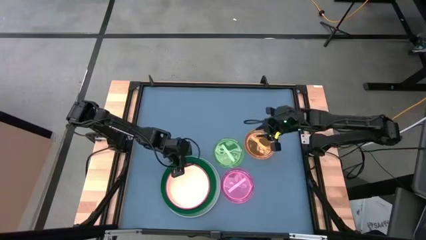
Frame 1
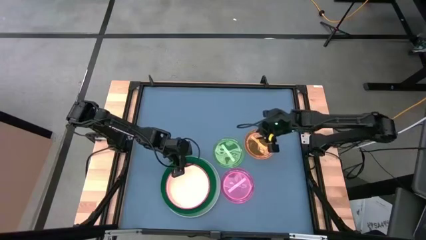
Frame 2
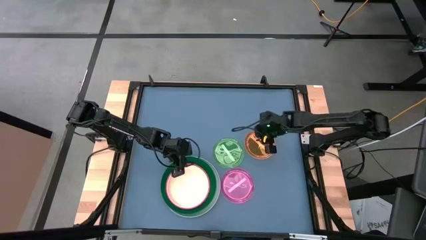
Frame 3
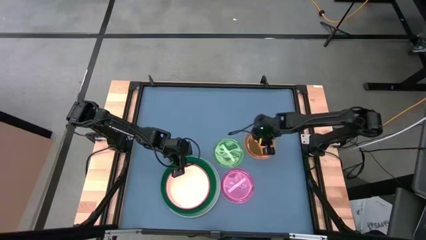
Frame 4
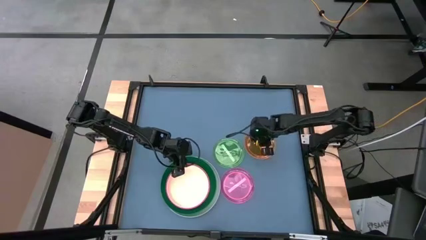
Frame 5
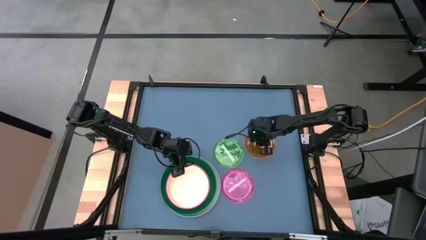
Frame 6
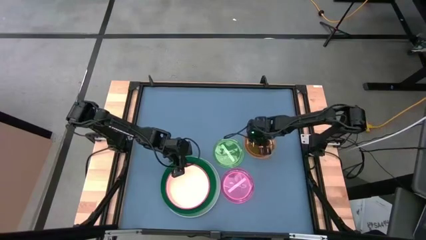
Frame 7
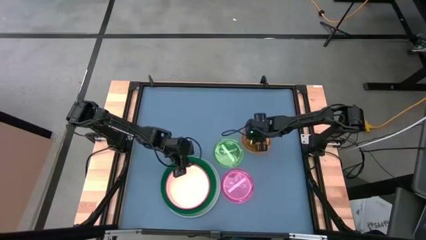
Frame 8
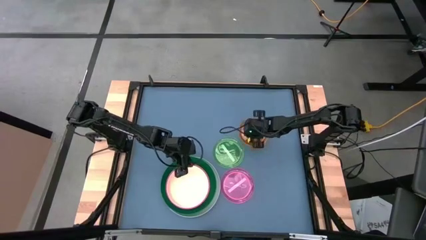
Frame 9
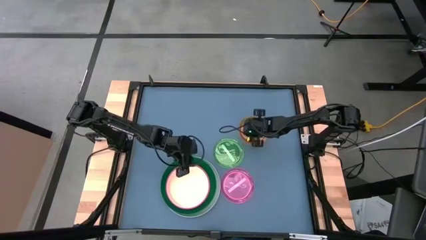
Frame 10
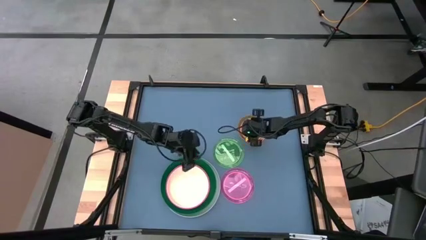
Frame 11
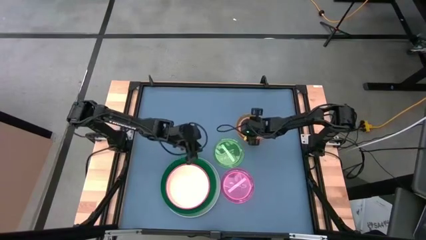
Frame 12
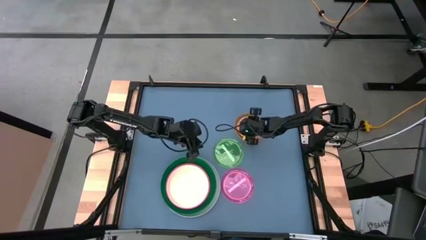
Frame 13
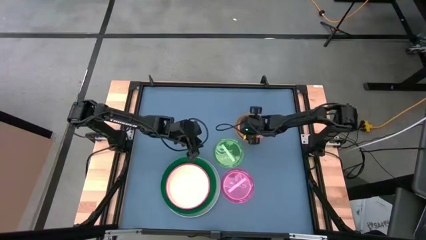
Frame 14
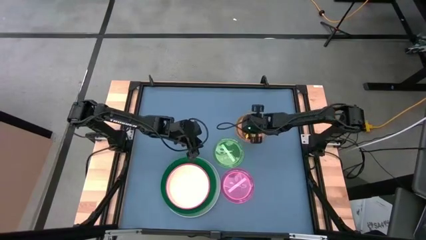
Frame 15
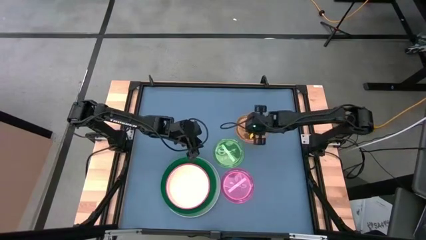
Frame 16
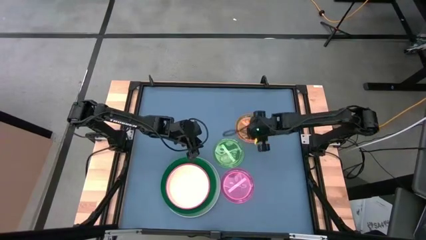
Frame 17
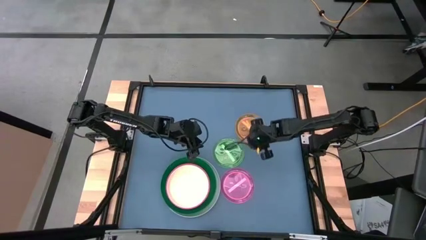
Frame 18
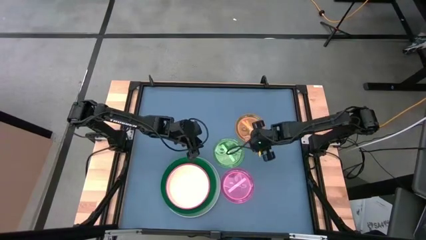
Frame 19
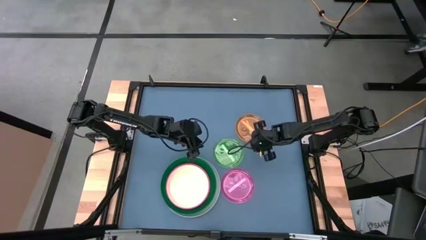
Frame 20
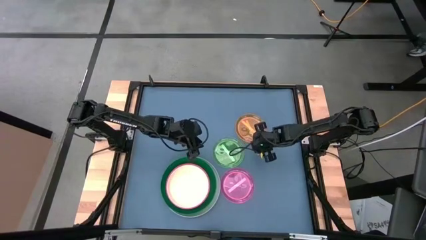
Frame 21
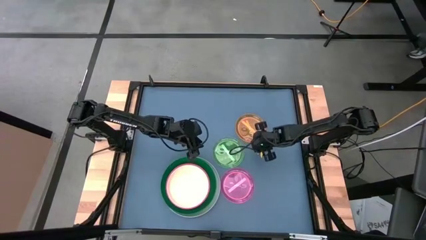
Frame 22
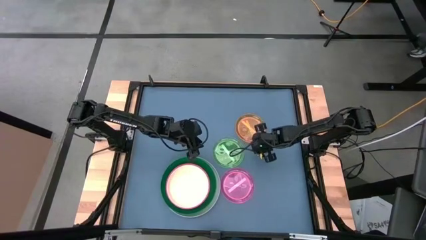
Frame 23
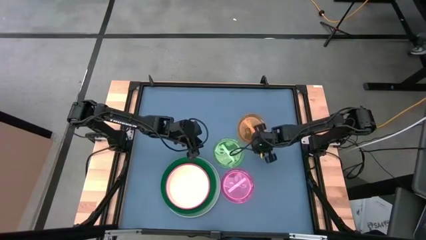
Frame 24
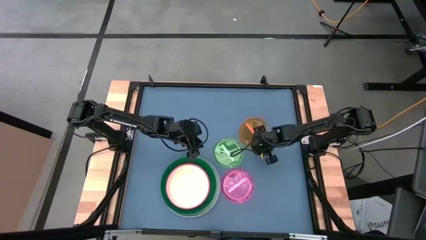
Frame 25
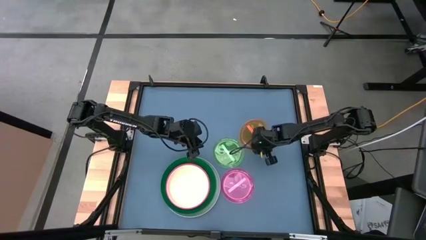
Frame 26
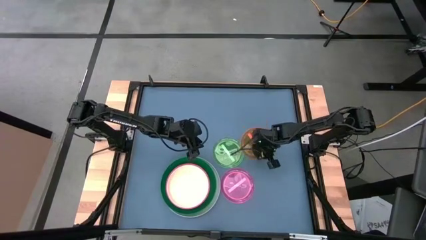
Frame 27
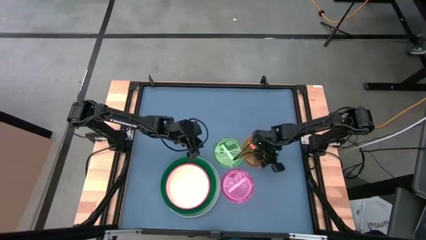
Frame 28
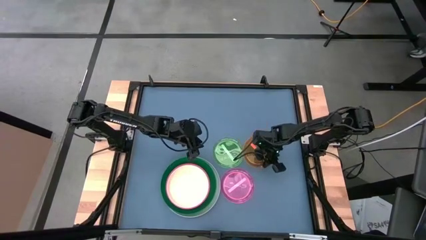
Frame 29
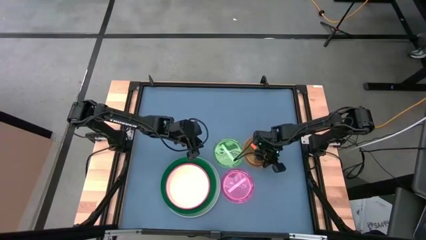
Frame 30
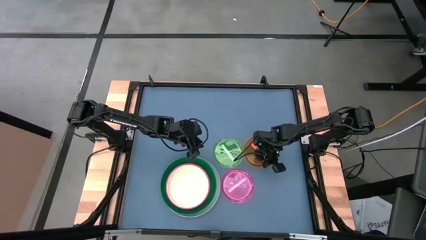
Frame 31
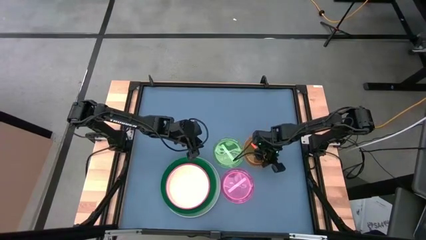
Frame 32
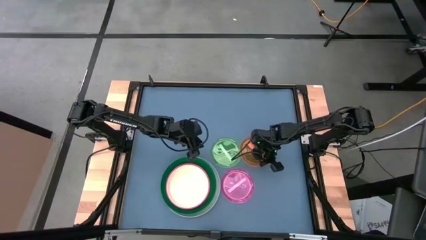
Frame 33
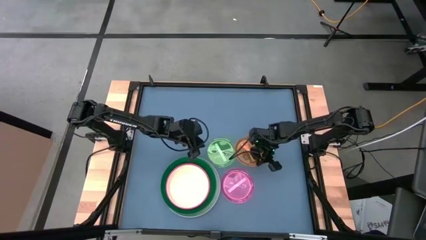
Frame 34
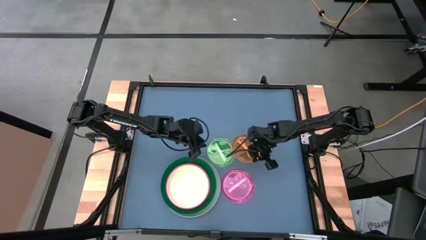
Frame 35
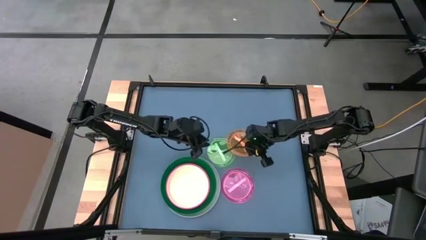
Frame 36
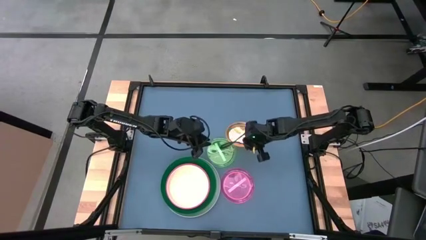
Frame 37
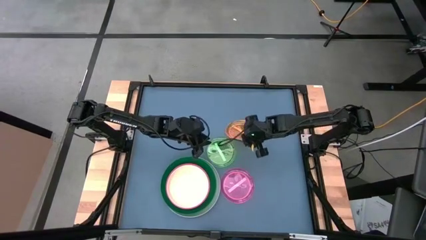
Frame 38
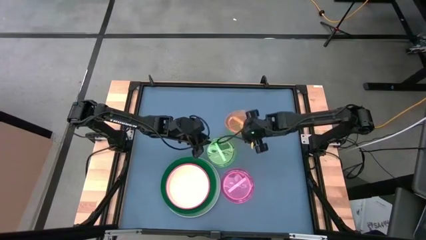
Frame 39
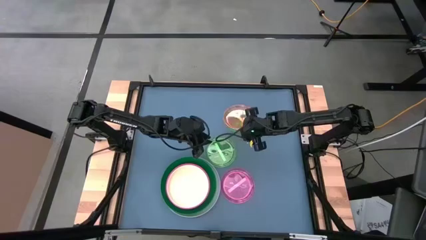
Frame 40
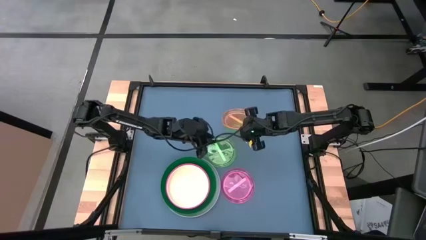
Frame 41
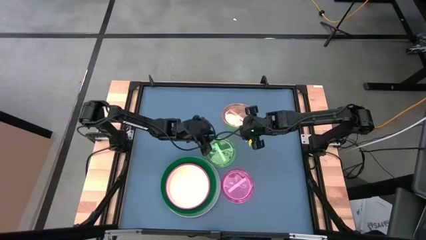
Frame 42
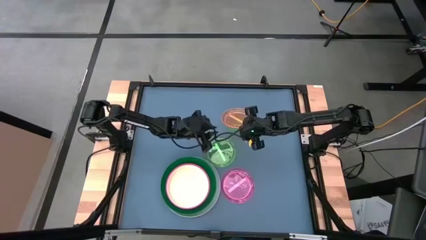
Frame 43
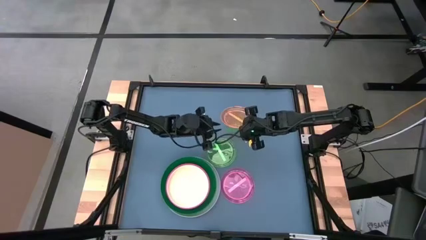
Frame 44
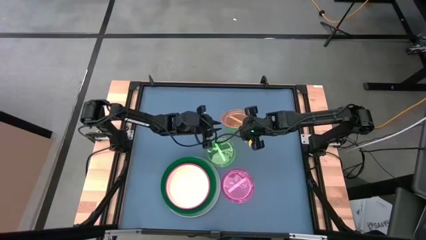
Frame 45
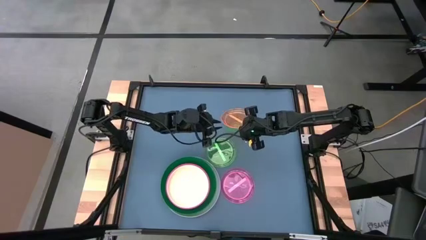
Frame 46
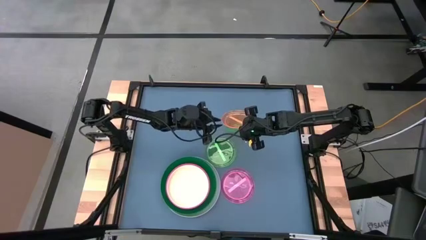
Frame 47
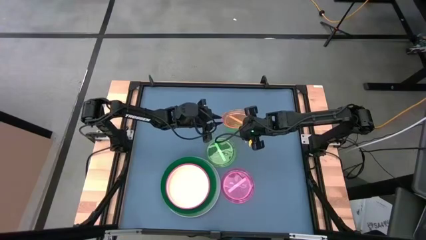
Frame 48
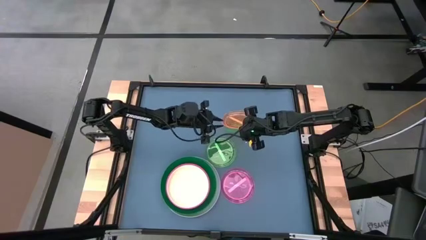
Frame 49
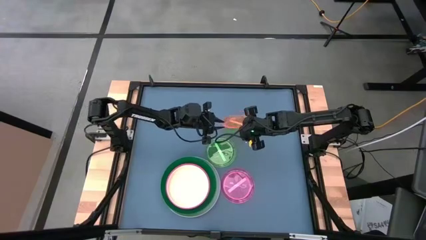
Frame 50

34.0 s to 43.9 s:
Task: Stack plastic plates
Stack the right light green plate on top of the light orange plate

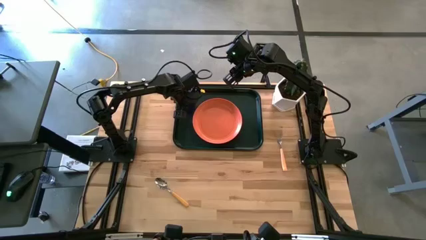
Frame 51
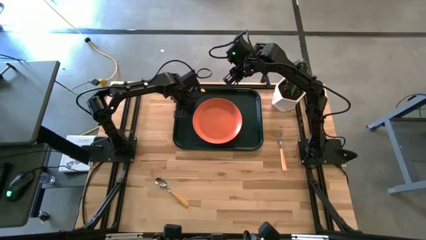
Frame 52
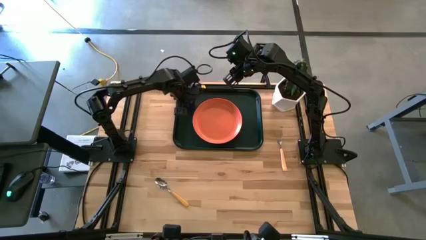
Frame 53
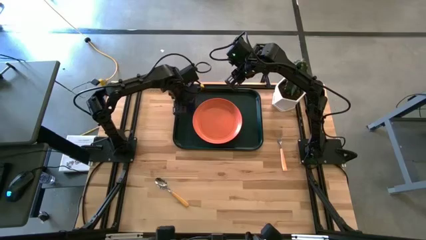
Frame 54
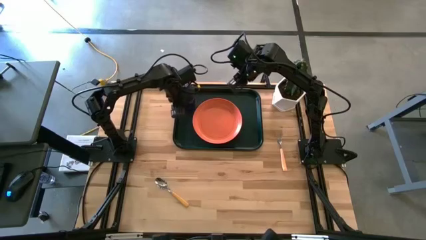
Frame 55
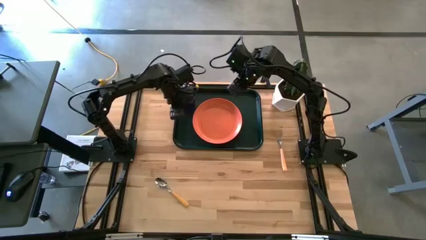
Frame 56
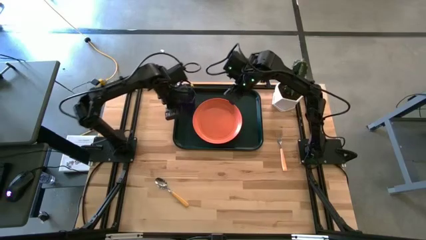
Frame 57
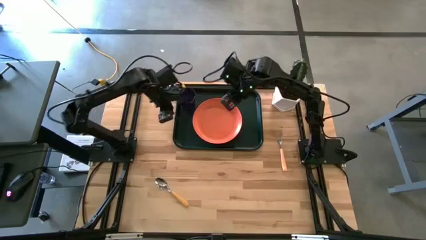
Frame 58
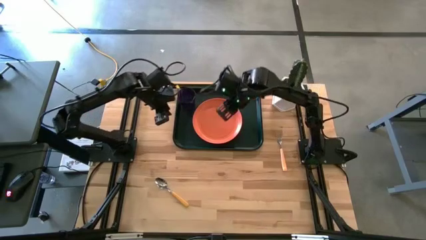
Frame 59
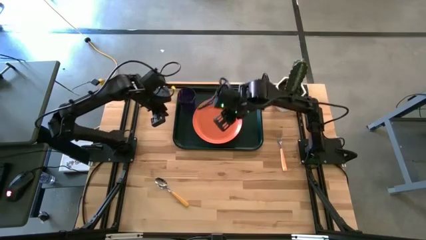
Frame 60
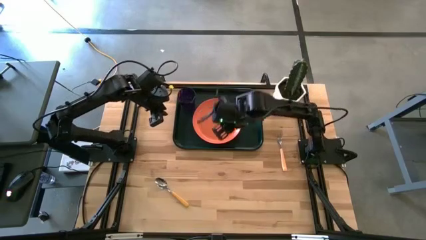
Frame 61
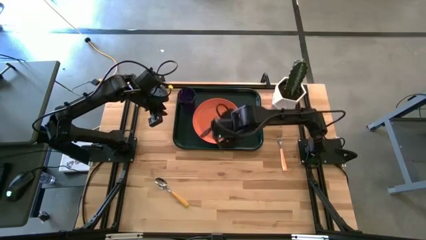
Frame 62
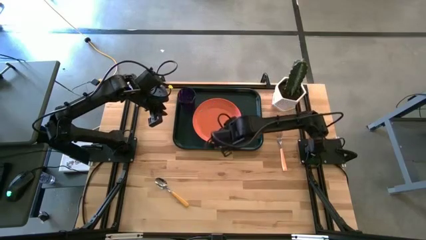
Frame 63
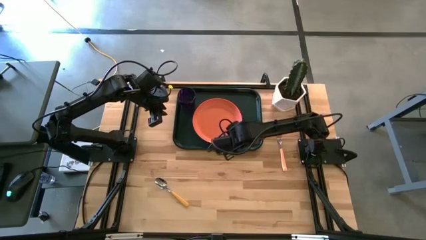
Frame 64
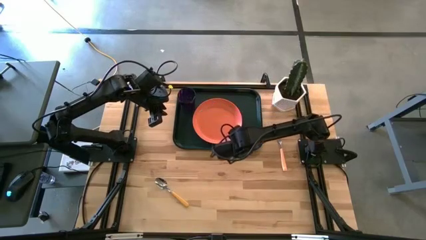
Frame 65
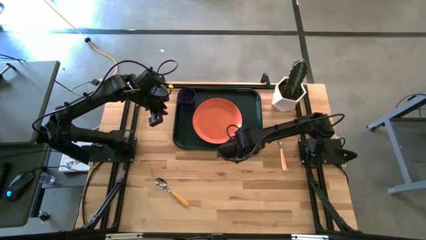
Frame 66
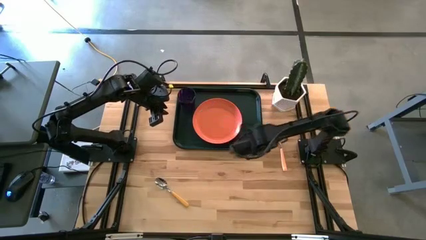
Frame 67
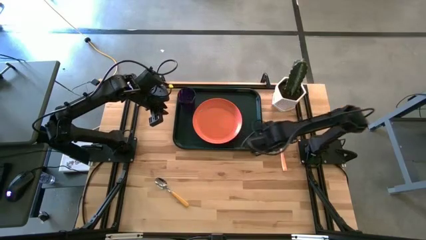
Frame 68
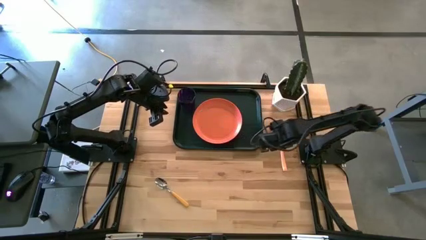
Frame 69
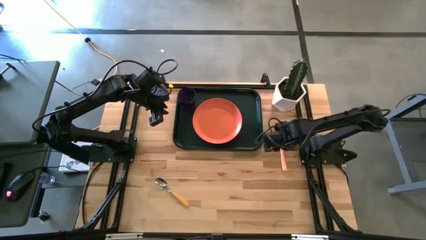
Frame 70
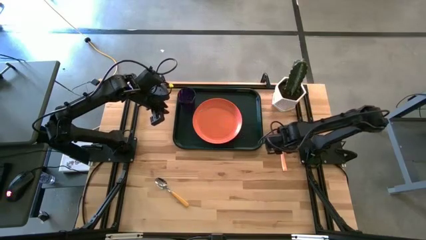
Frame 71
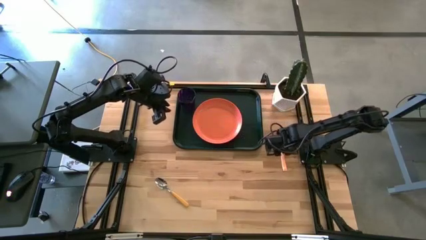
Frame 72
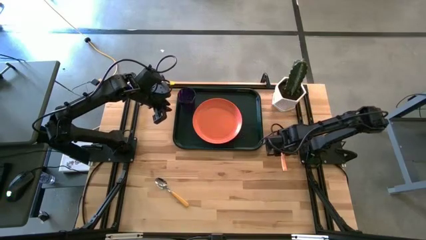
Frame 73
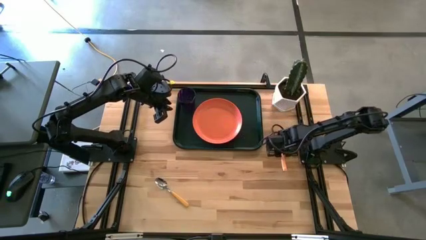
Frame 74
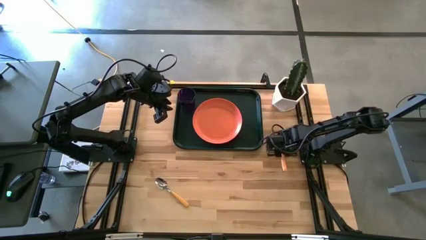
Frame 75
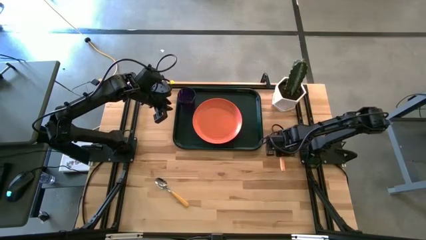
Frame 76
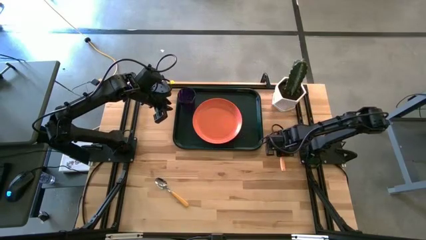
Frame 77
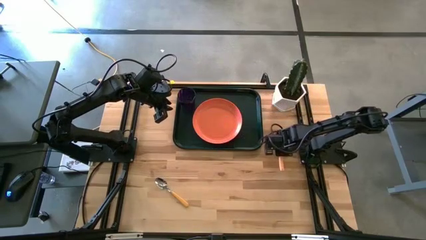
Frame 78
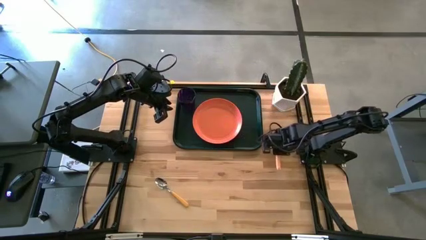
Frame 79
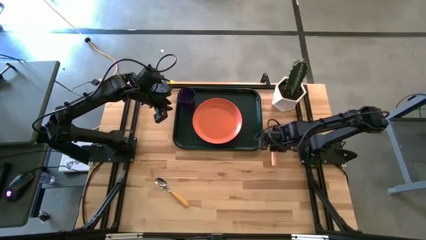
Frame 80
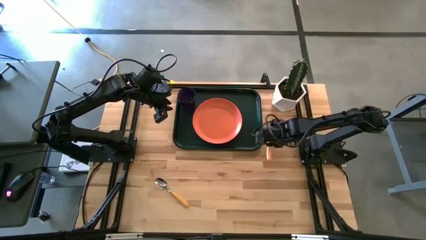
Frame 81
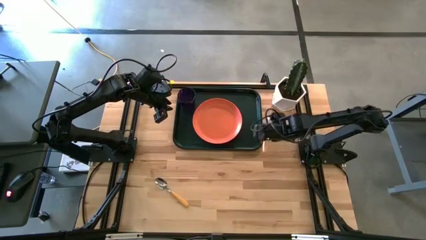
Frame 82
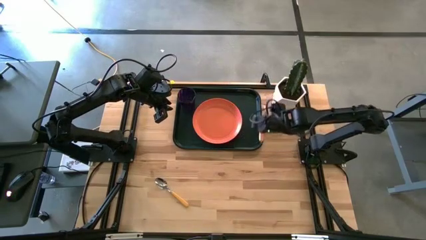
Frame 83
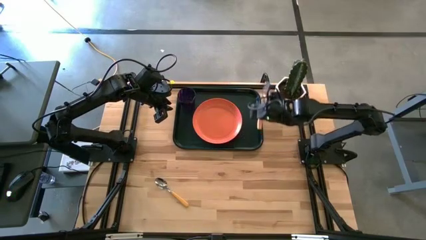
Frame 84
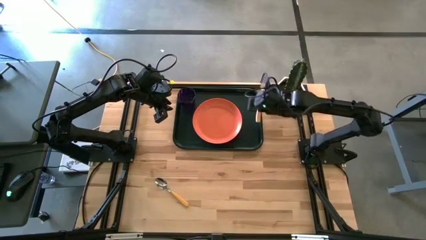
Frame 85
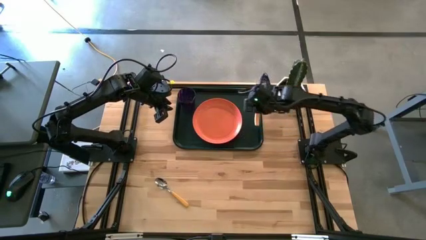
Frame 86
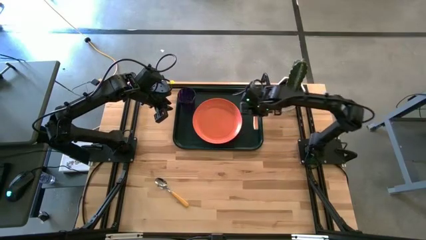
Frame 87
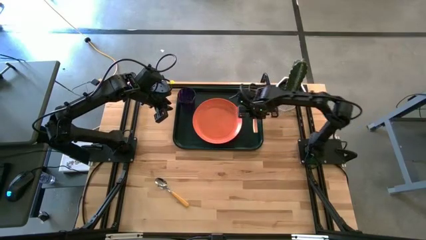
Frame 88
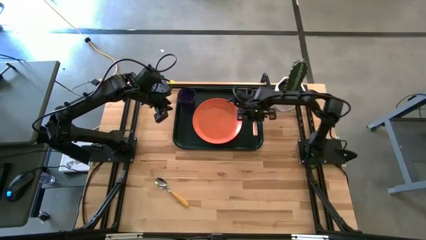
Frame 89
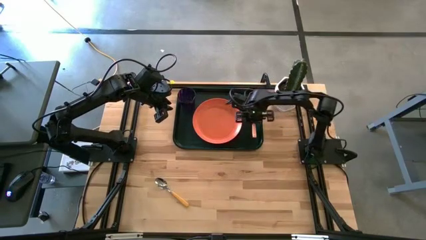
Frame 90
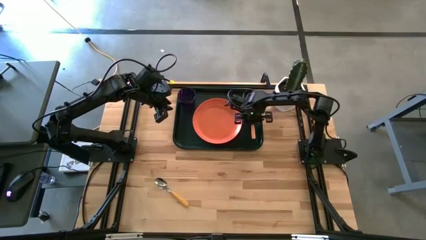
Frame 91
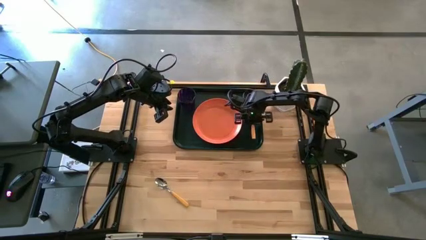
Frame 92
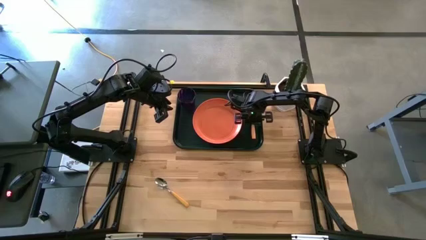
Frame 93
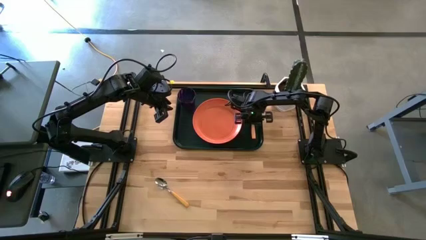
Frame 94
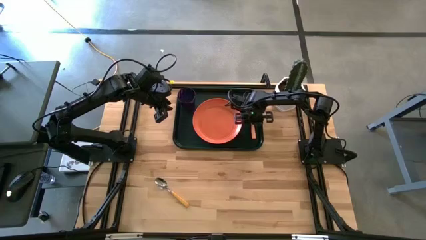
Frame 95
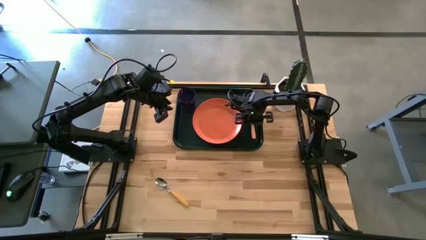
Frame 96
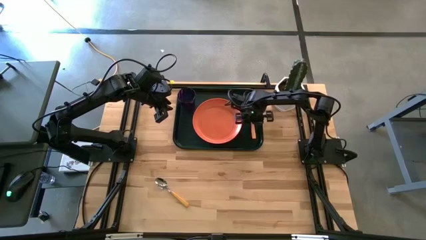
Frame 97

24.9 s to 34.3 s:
Task: Pick and place plate/cup/fork/spoon on tray
Put the yellow fork on the black serving tray to the right of the orange plate
